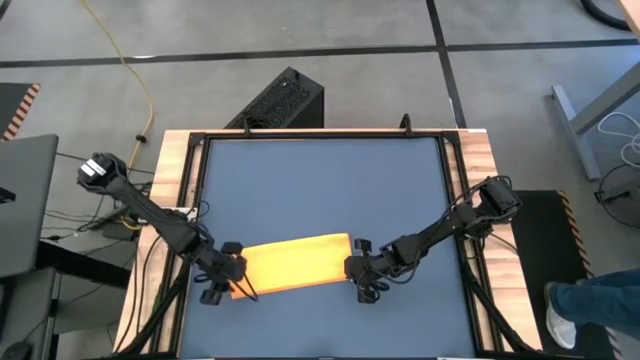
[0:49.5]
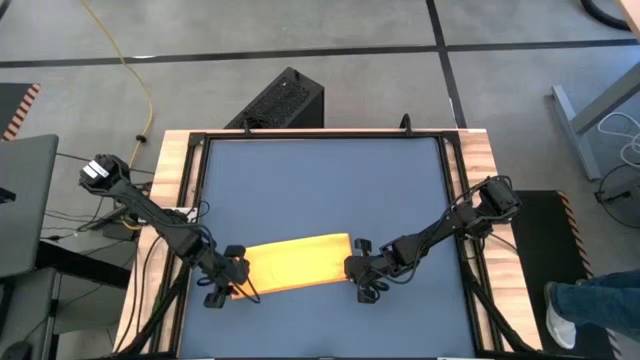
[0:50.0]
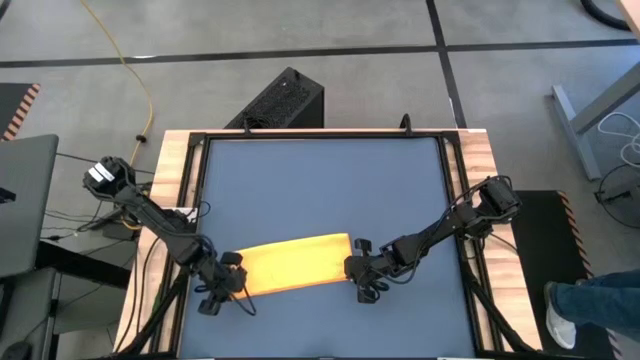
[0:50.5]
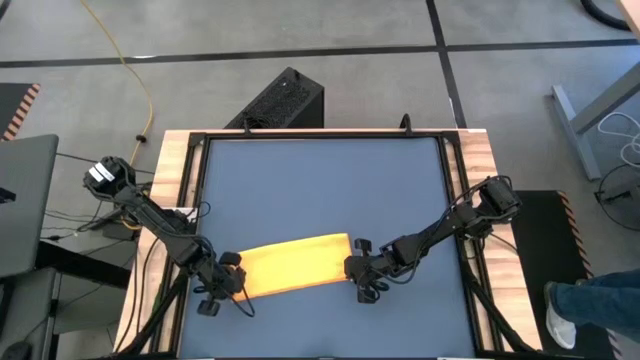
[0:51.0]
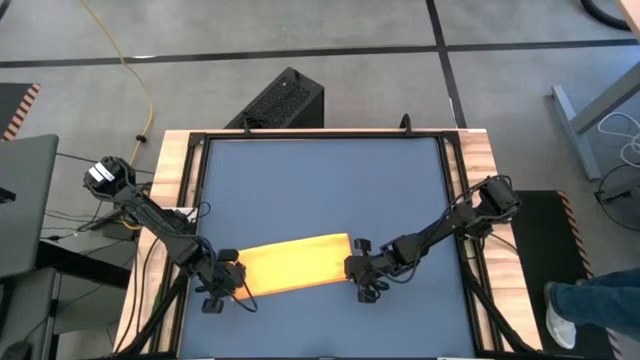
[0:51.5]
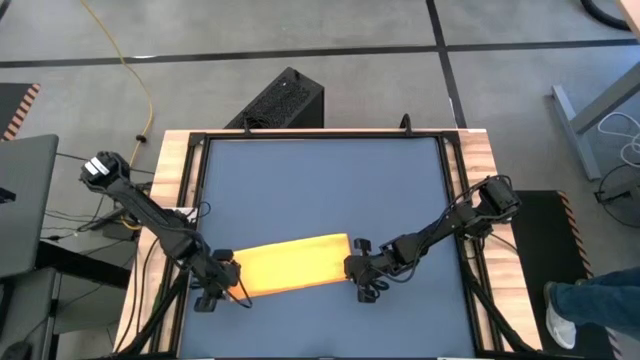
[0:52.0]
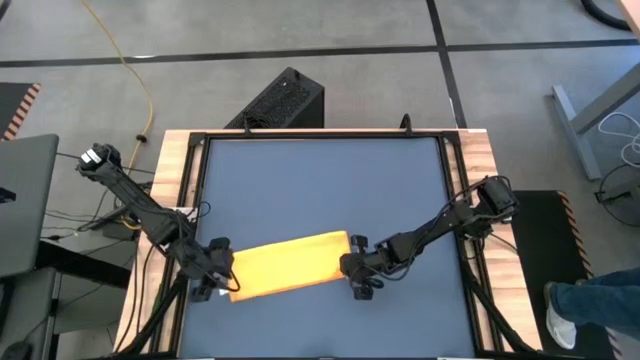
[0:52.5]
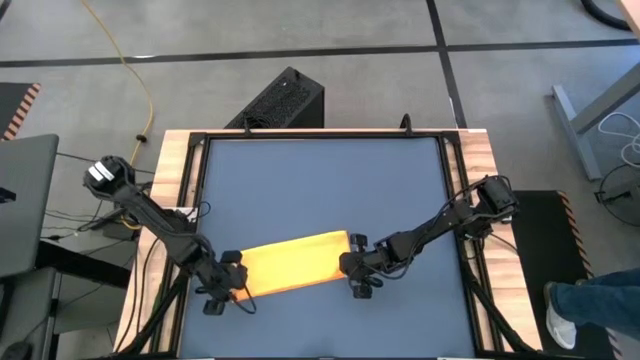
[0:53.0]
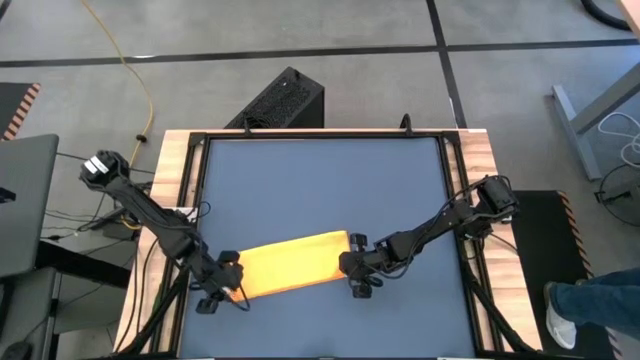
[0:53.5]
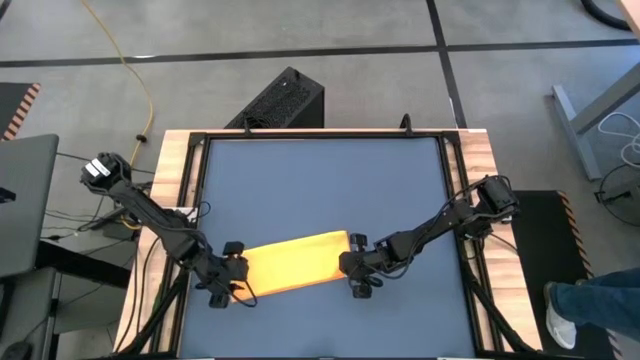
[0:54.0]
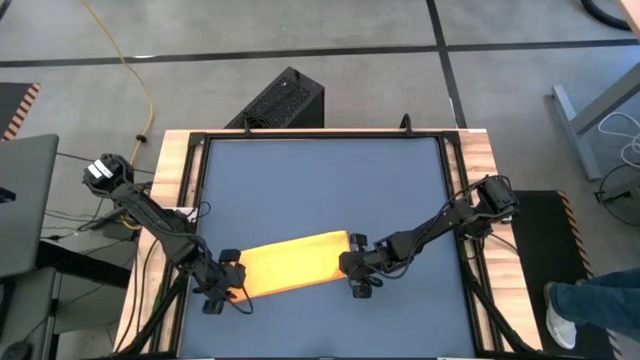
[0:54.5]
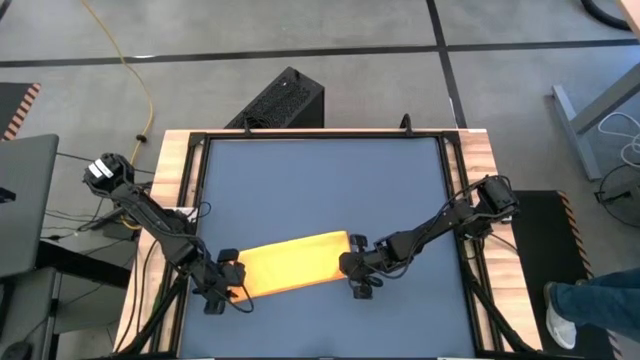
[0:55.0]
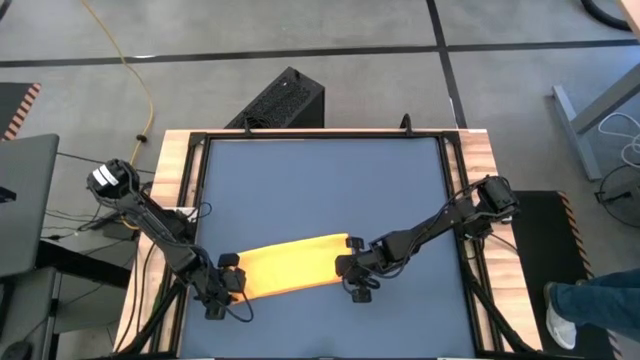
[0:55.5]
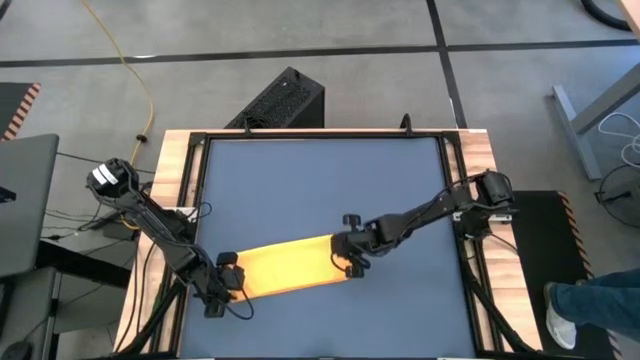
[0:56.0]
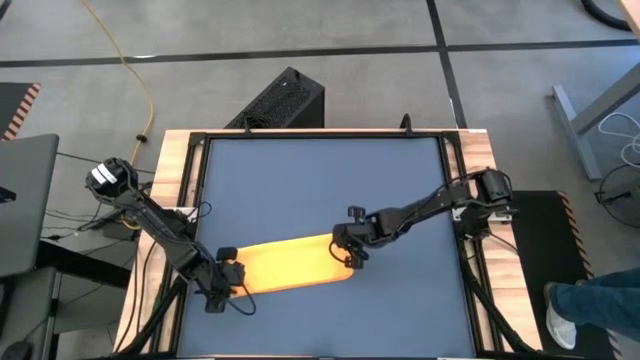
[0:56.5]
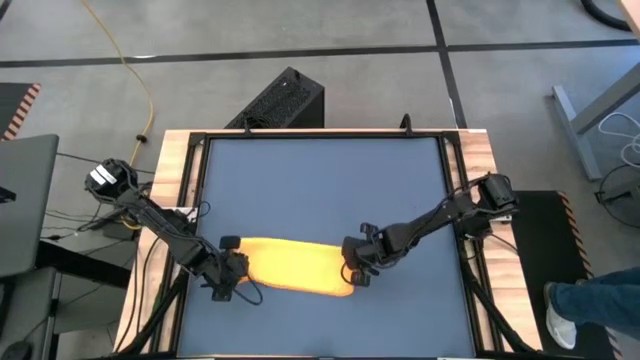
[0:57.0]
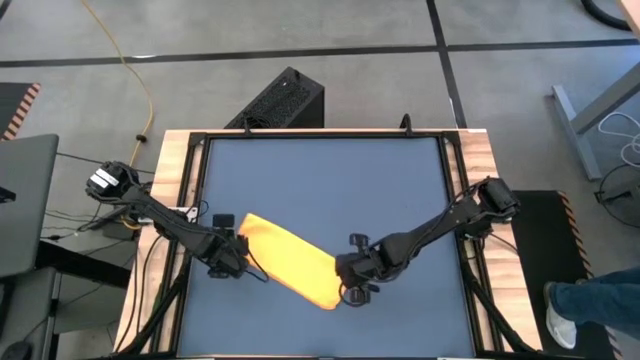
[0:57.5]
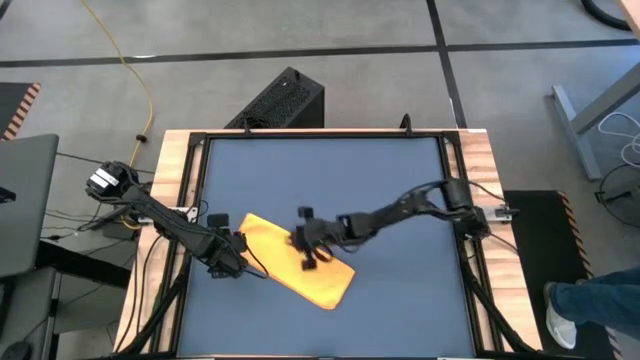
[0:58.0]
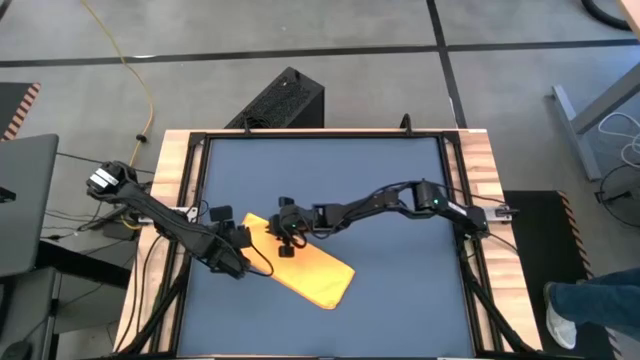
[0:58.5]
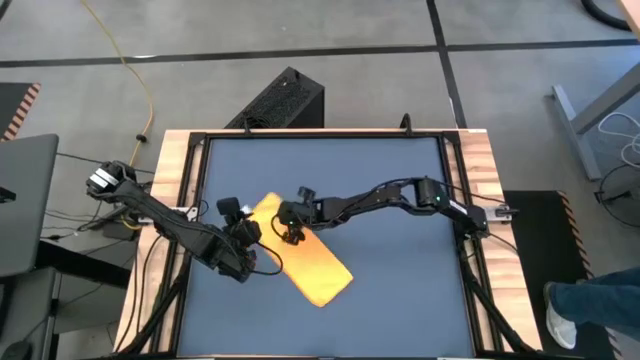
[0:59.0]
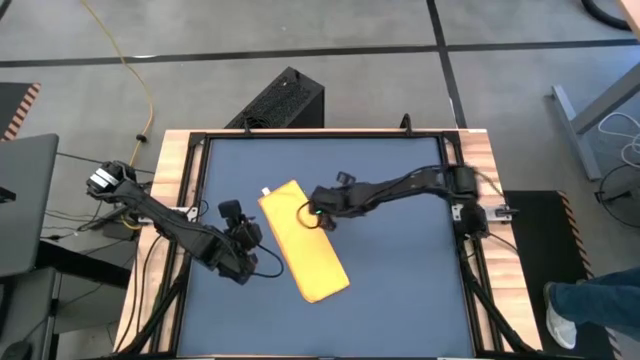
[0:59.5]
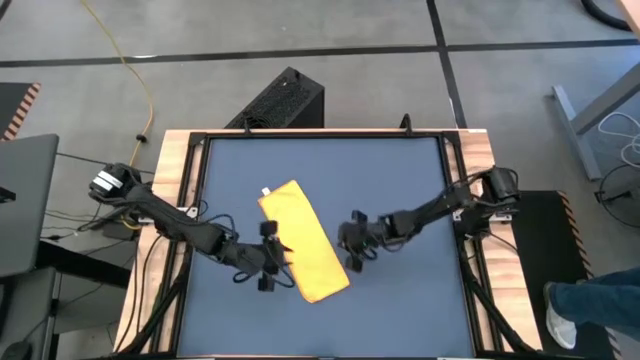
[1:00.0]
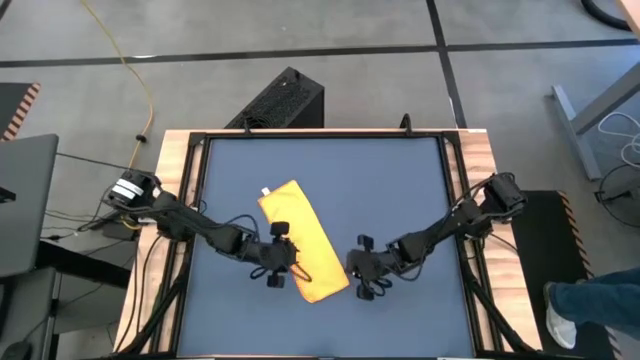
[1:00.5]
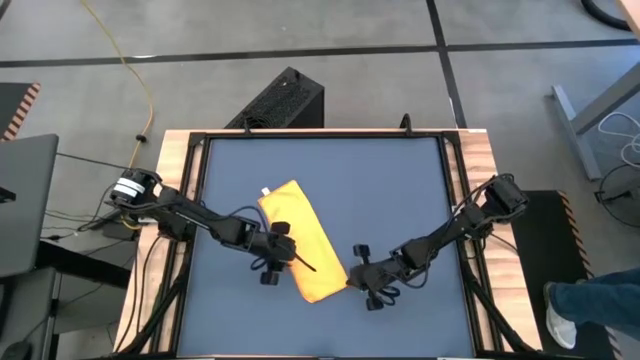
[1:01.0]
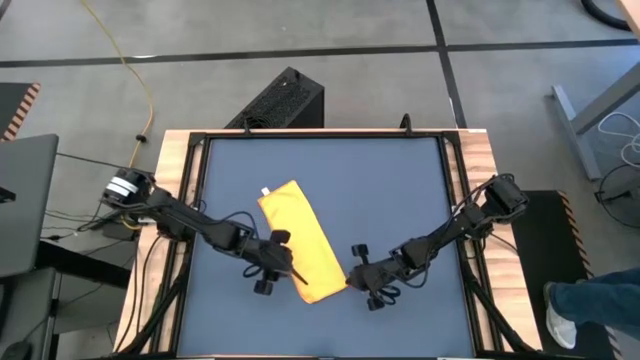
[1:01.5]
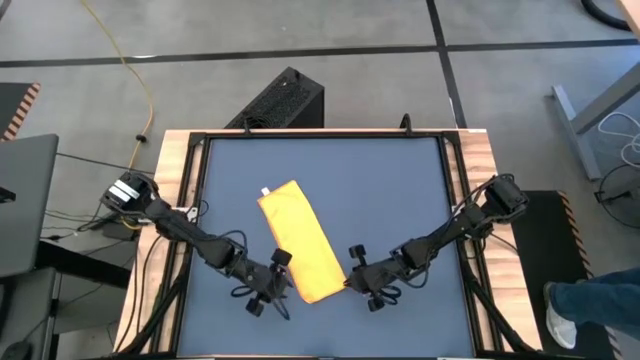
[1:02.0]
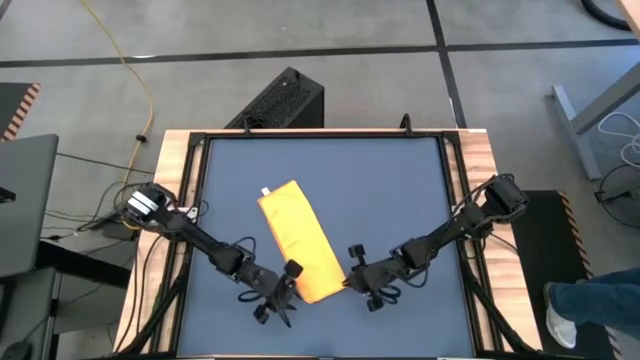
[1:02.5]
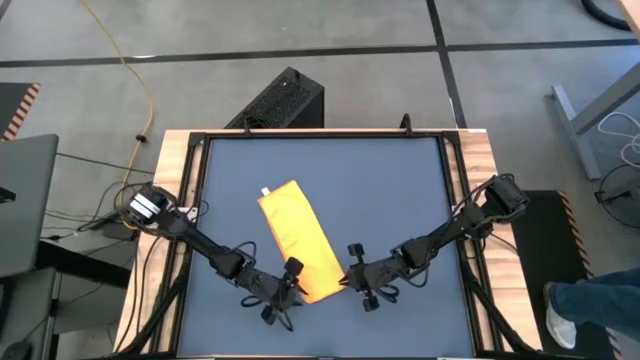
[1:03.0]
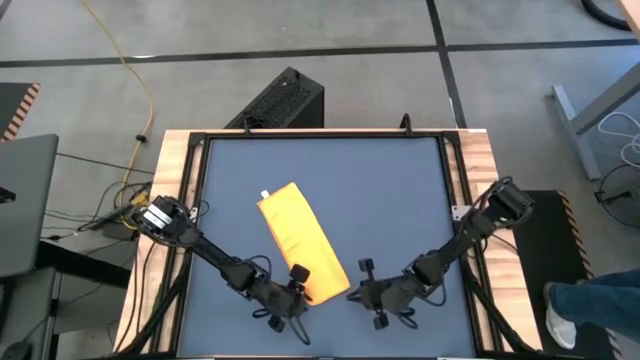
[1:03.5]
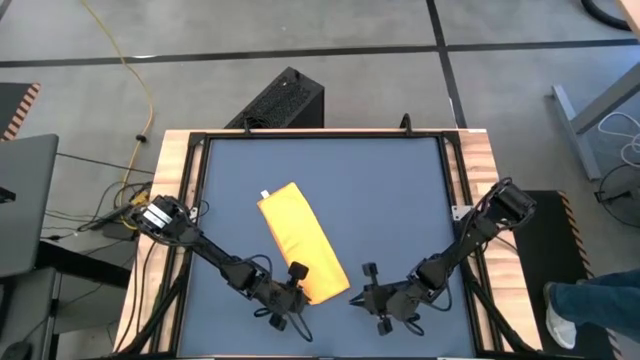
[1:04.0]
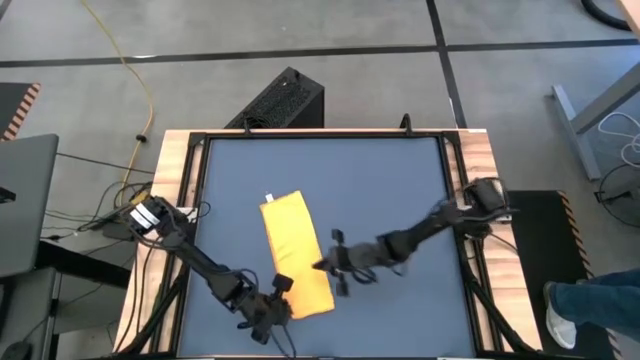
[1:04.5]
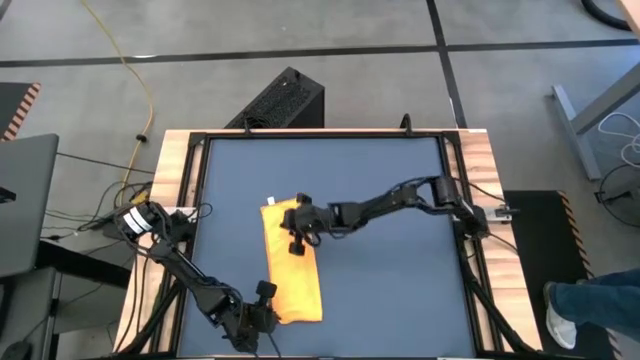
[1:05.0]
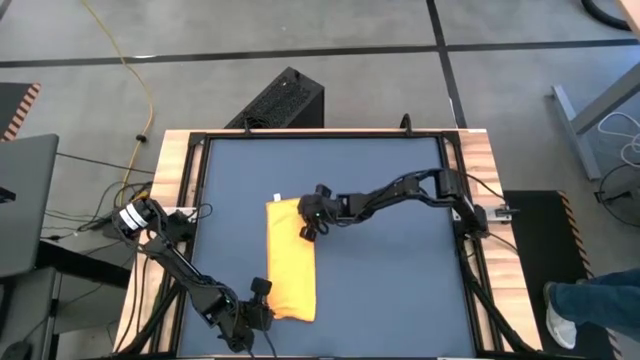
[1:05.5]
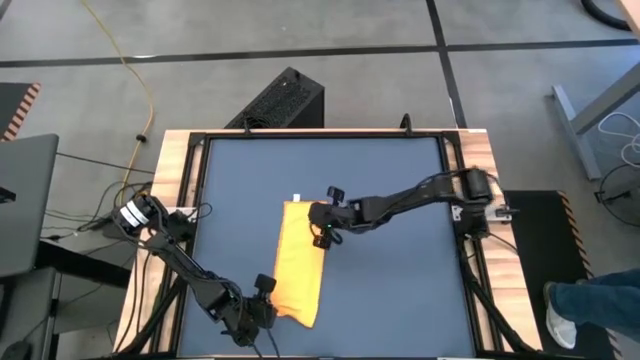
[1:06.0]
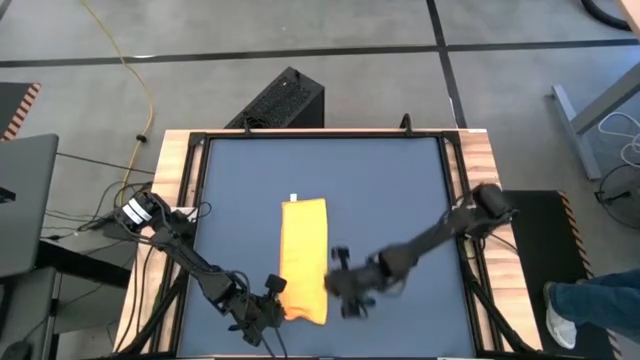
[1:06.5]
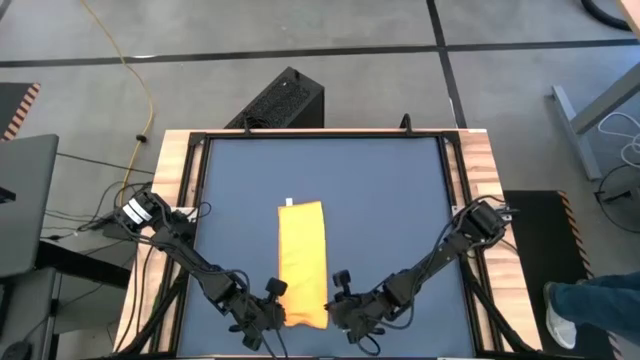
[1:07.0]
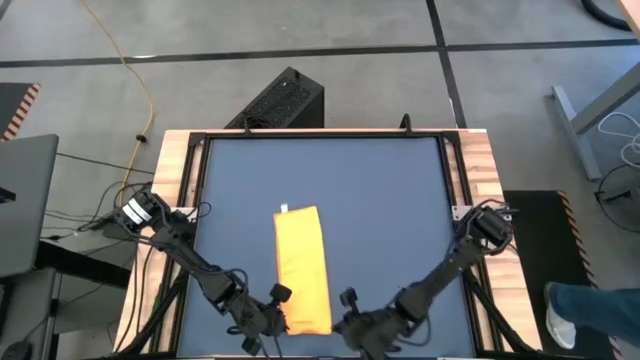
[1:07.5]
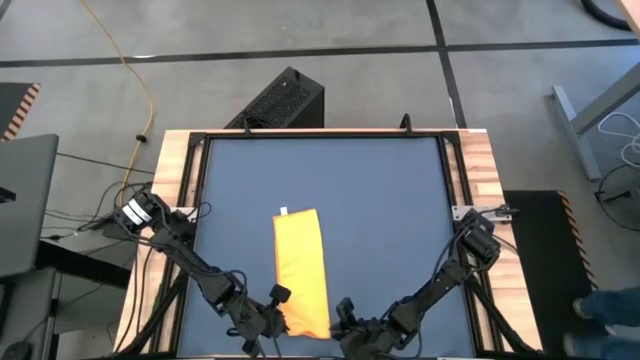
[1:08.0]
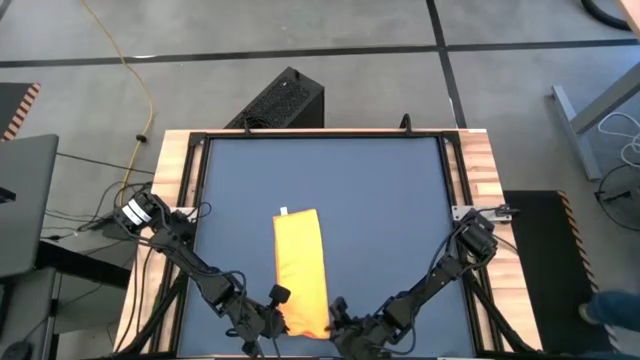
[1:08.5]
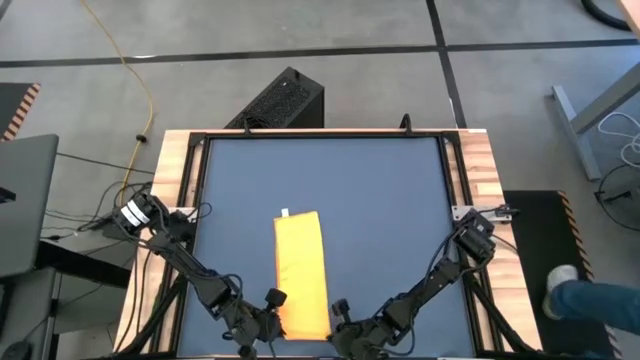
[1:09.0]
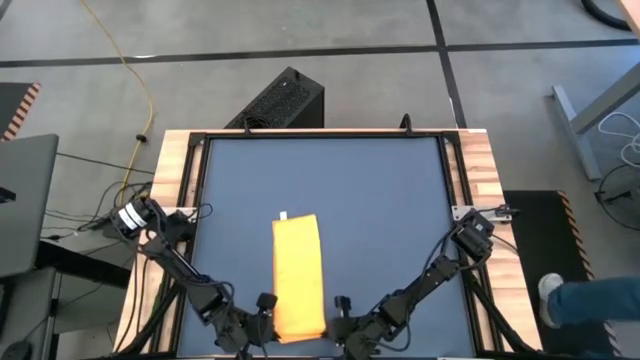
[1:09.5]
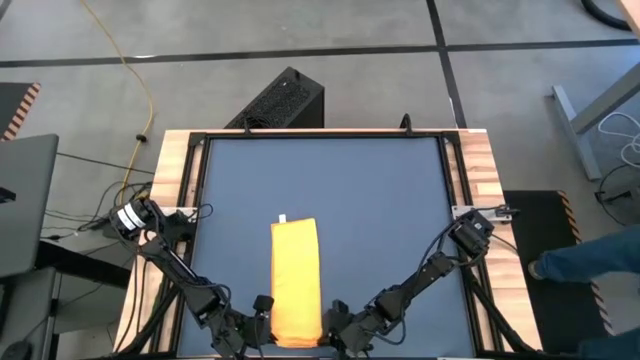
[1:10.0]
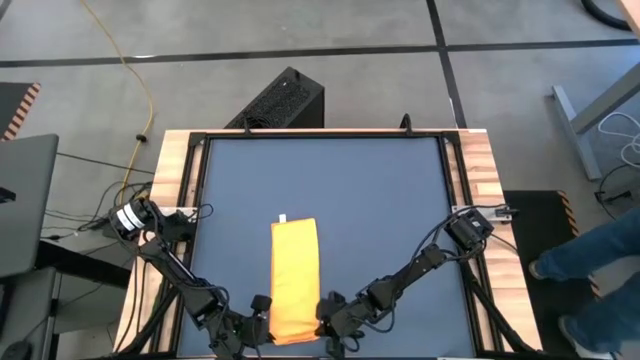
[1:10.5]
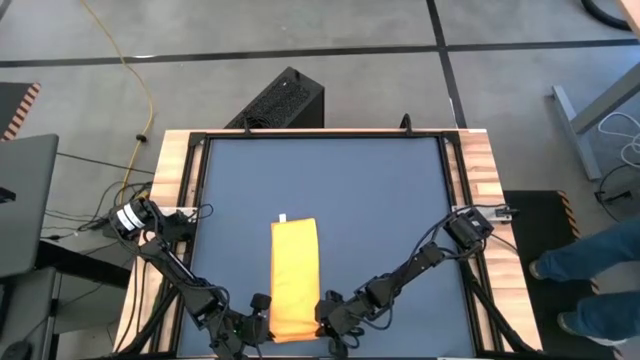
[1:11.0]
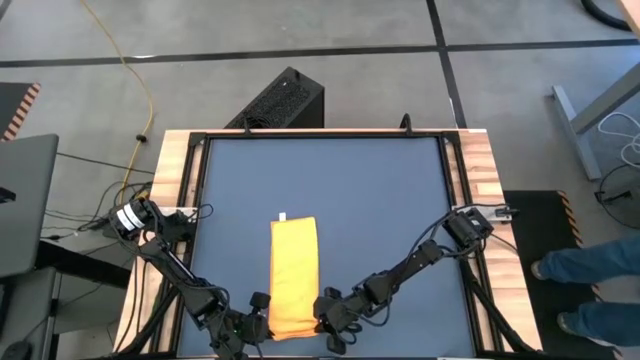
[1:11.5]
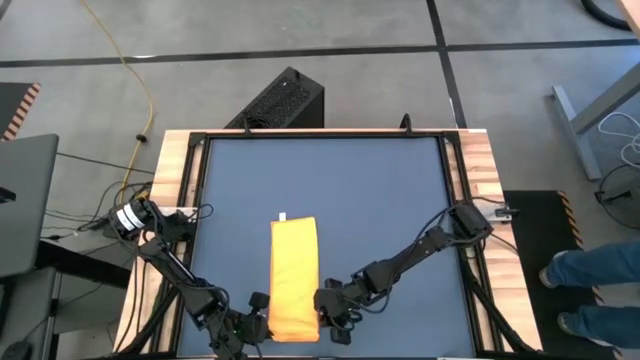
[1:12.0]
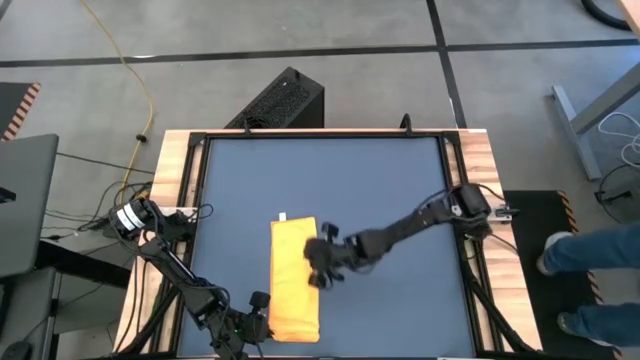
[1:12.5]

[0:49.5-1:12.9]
Task: Roll towel into tight, uniform cylinder
Roll the orange towel
